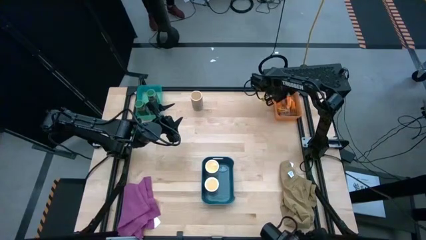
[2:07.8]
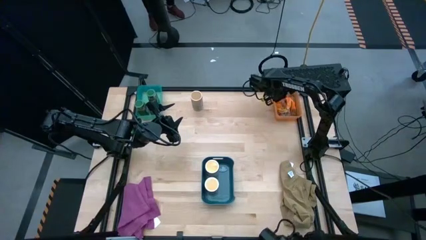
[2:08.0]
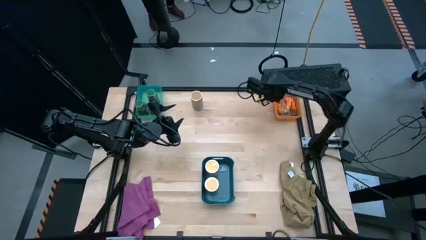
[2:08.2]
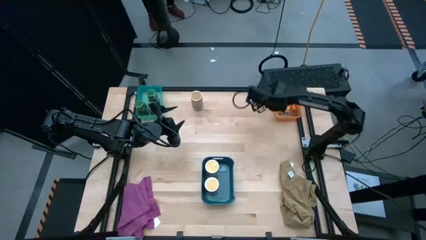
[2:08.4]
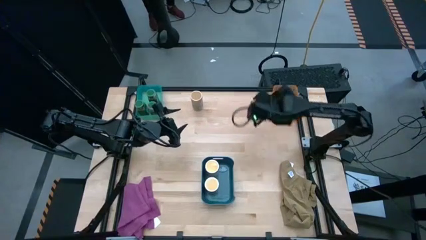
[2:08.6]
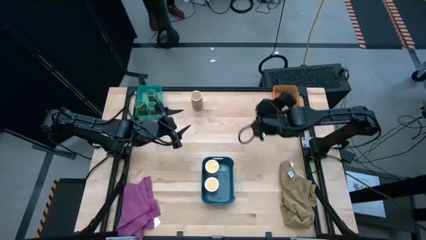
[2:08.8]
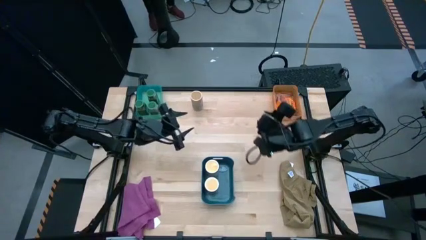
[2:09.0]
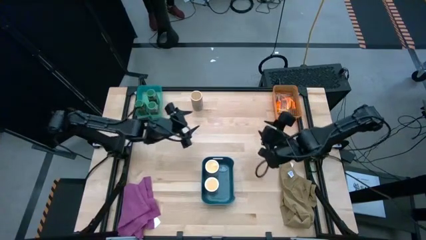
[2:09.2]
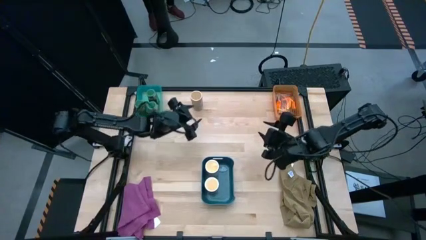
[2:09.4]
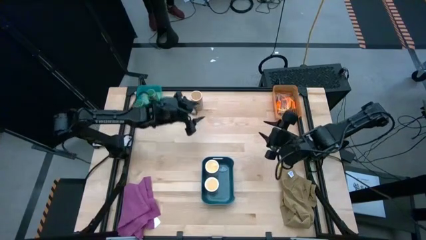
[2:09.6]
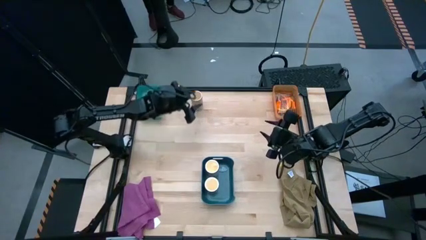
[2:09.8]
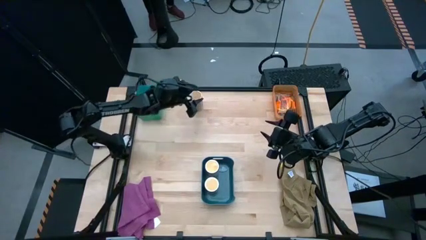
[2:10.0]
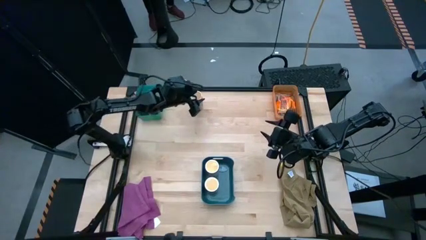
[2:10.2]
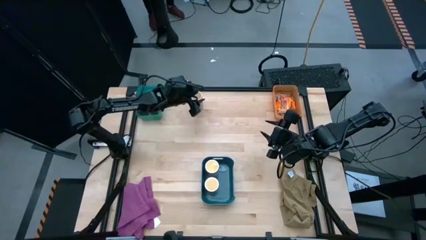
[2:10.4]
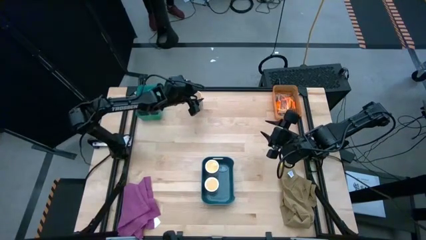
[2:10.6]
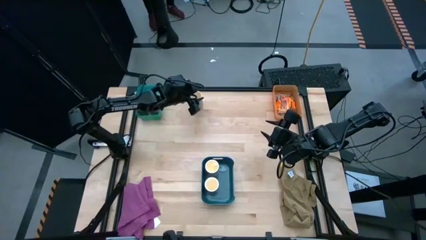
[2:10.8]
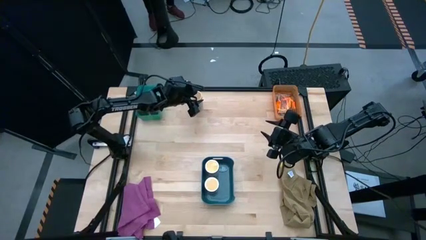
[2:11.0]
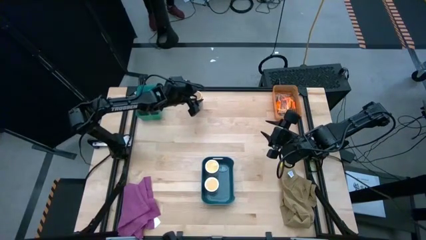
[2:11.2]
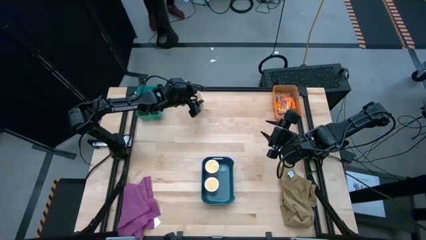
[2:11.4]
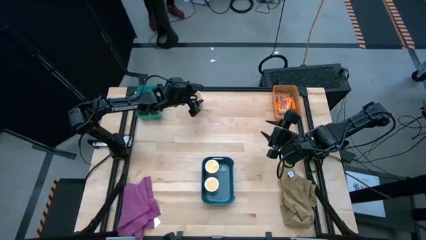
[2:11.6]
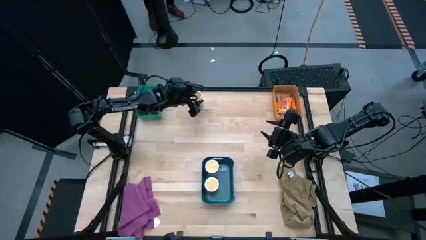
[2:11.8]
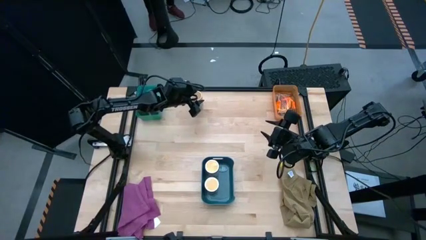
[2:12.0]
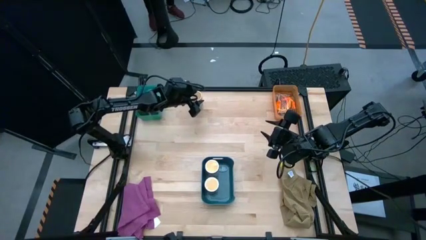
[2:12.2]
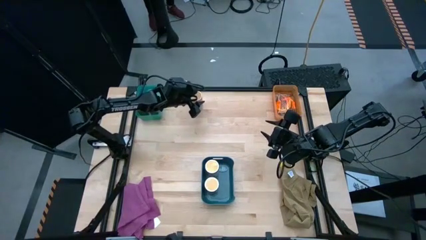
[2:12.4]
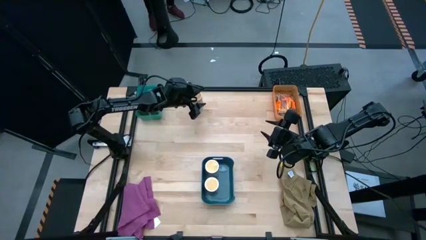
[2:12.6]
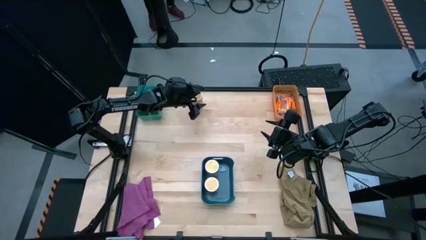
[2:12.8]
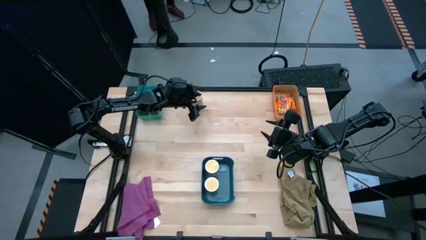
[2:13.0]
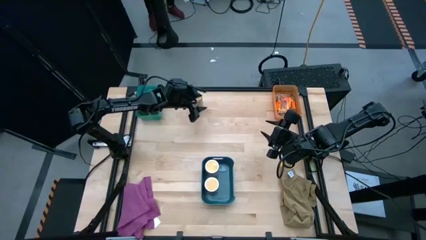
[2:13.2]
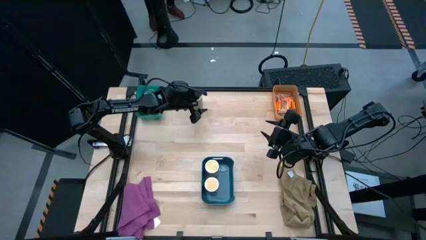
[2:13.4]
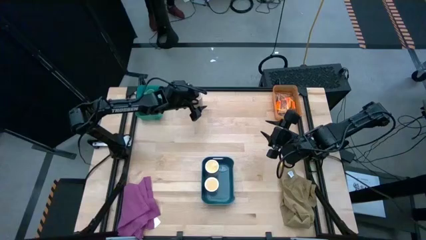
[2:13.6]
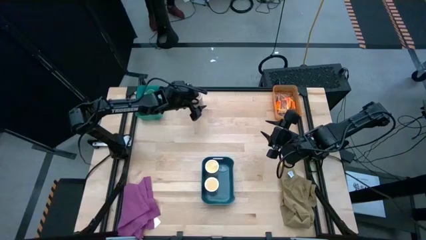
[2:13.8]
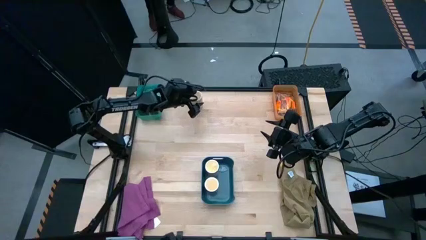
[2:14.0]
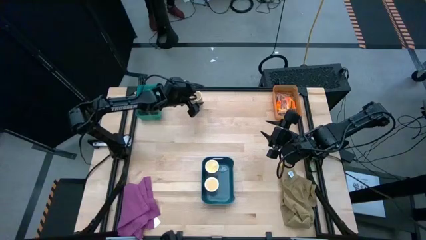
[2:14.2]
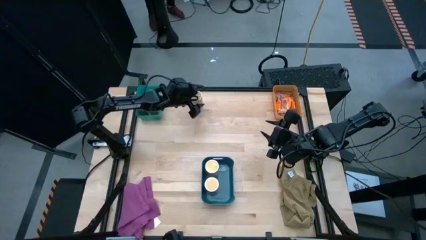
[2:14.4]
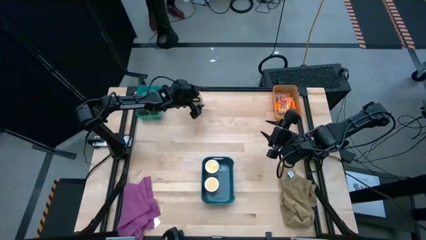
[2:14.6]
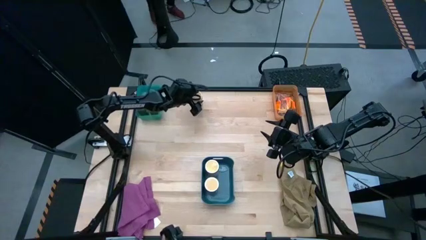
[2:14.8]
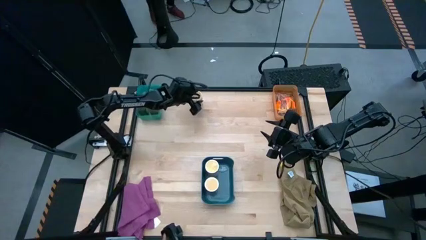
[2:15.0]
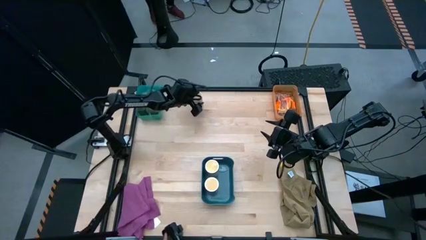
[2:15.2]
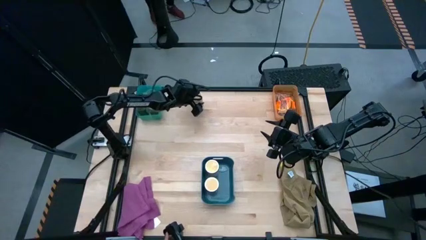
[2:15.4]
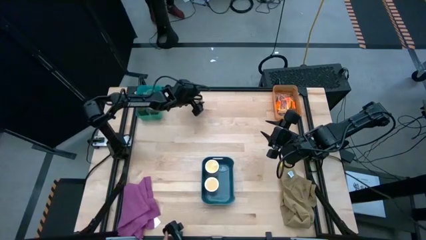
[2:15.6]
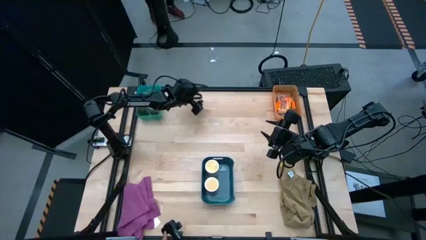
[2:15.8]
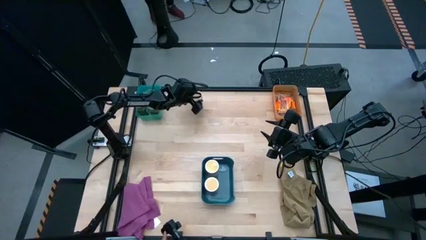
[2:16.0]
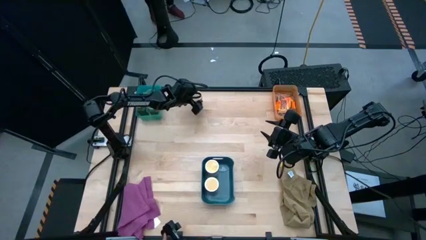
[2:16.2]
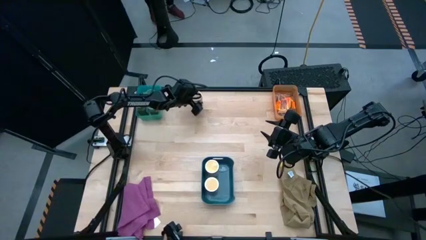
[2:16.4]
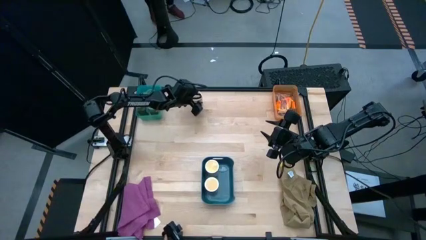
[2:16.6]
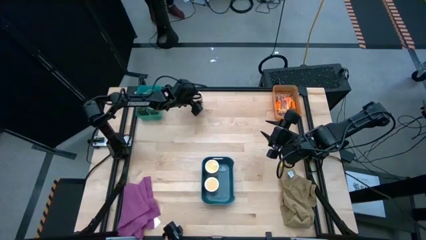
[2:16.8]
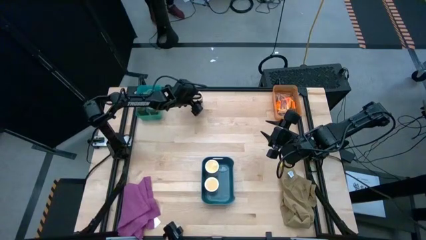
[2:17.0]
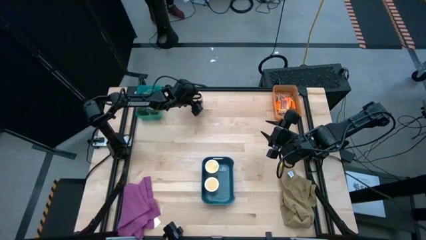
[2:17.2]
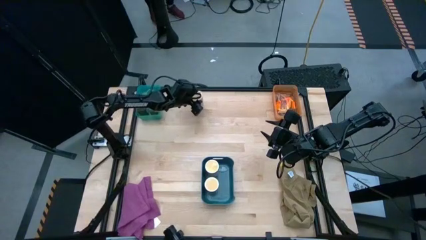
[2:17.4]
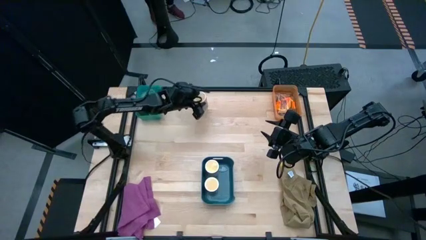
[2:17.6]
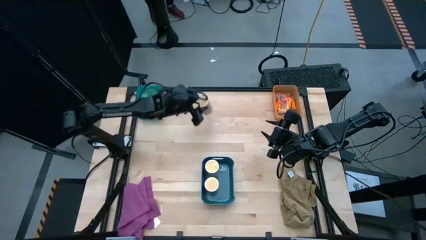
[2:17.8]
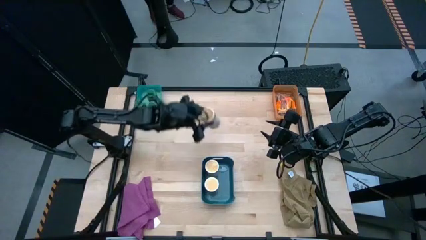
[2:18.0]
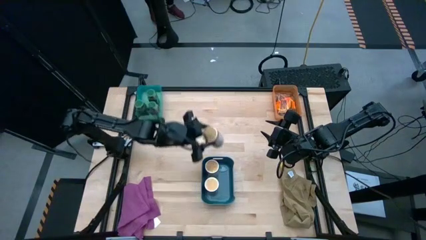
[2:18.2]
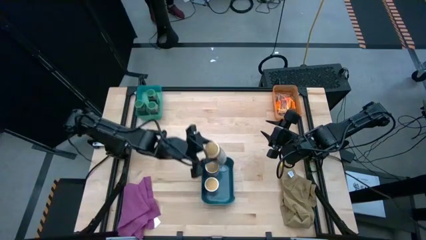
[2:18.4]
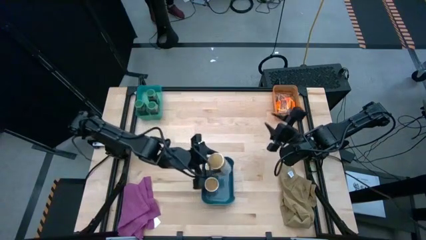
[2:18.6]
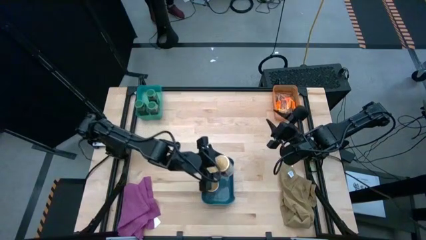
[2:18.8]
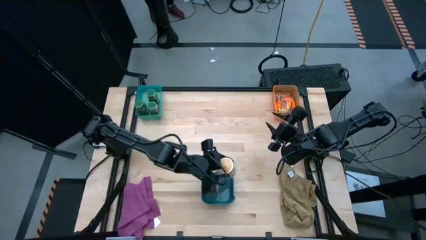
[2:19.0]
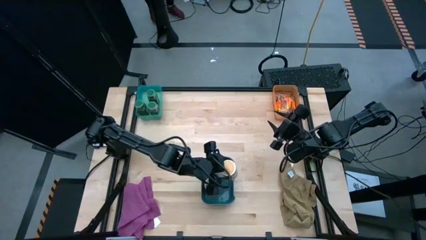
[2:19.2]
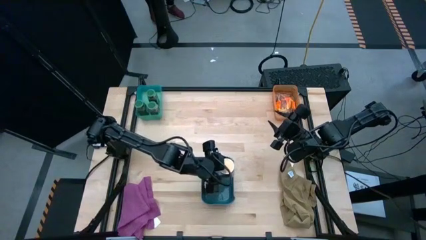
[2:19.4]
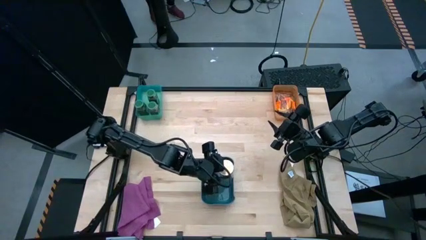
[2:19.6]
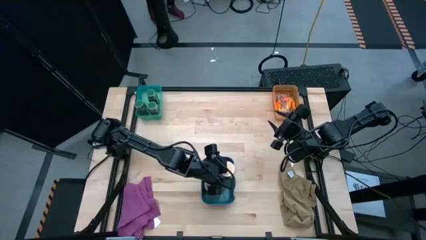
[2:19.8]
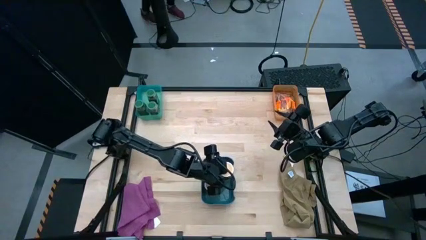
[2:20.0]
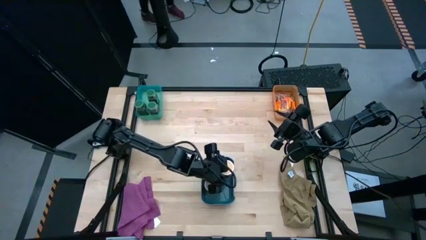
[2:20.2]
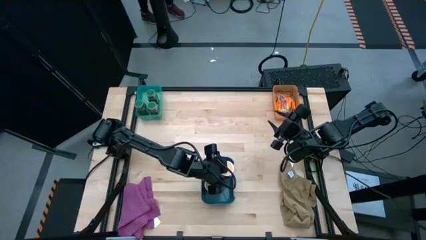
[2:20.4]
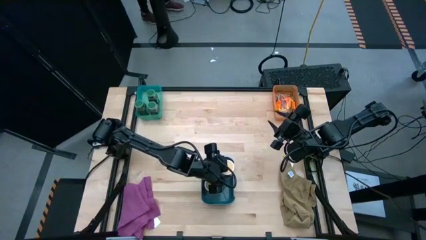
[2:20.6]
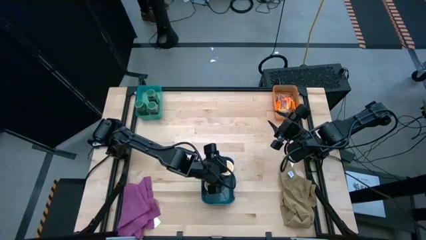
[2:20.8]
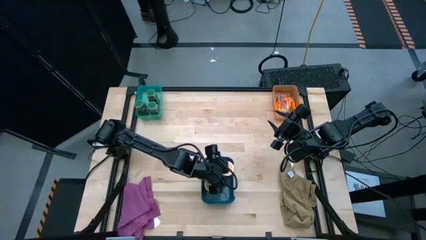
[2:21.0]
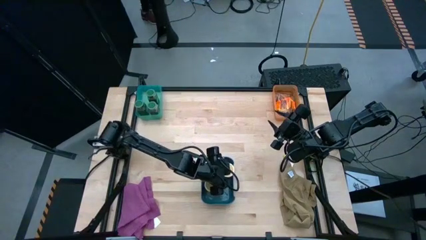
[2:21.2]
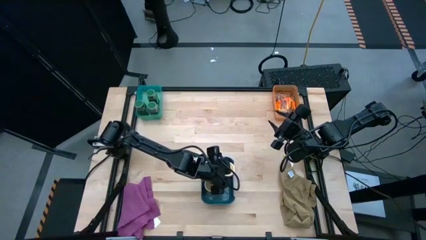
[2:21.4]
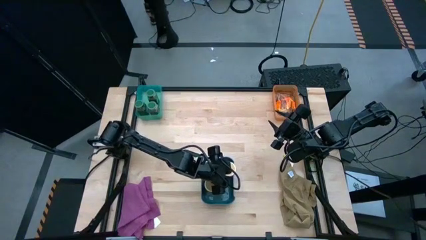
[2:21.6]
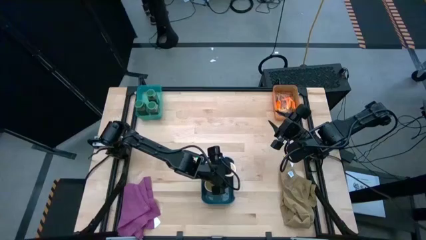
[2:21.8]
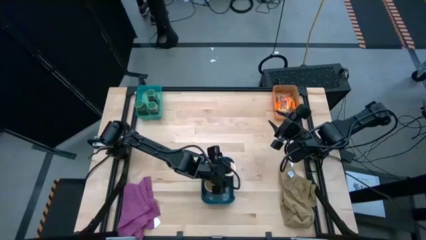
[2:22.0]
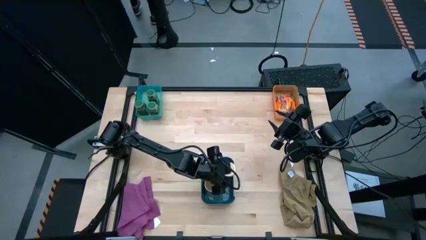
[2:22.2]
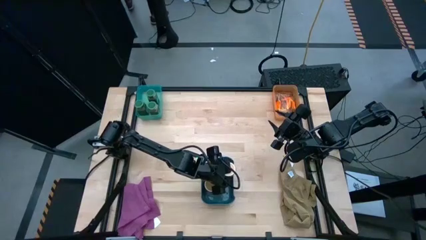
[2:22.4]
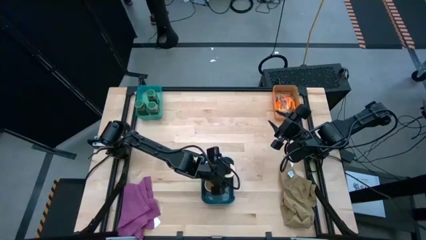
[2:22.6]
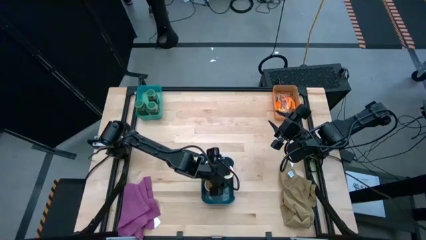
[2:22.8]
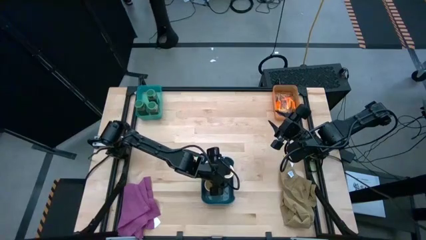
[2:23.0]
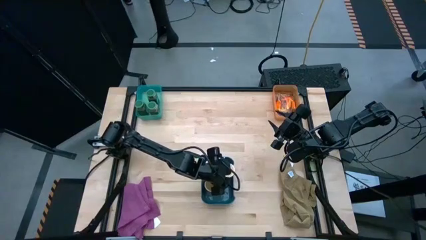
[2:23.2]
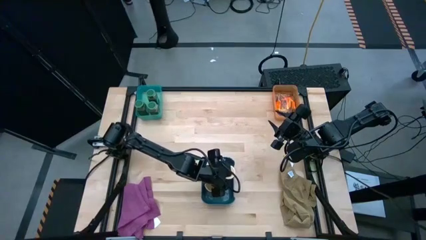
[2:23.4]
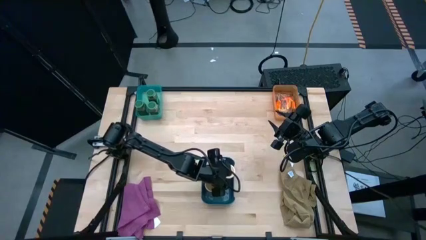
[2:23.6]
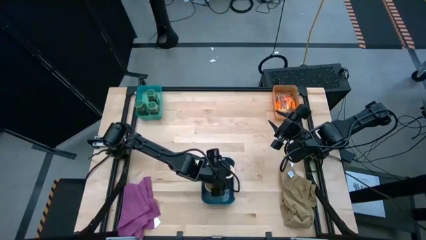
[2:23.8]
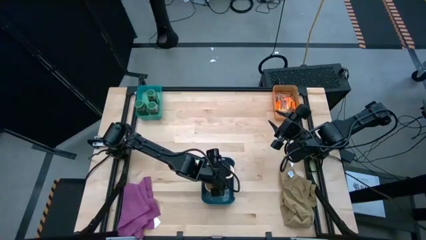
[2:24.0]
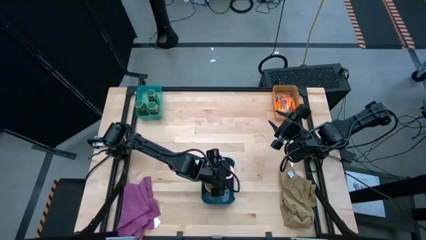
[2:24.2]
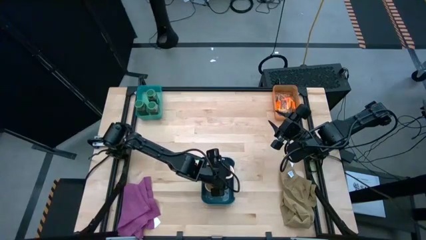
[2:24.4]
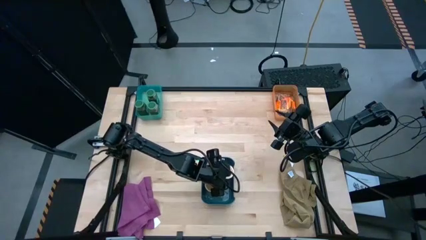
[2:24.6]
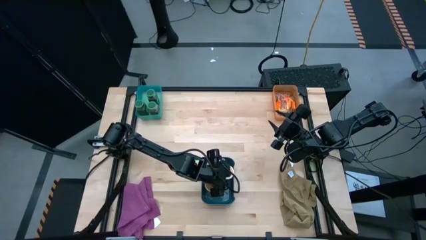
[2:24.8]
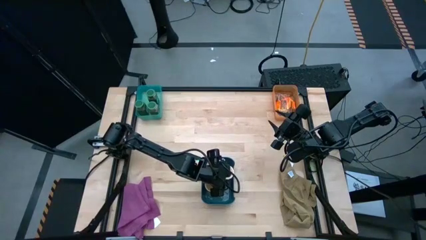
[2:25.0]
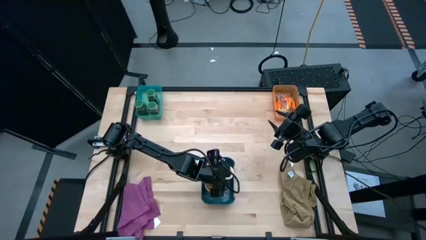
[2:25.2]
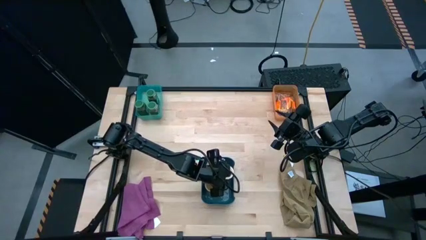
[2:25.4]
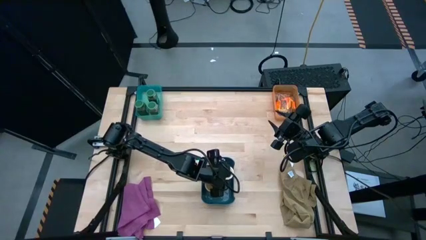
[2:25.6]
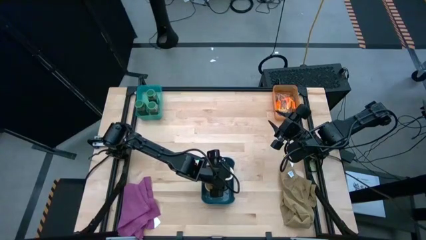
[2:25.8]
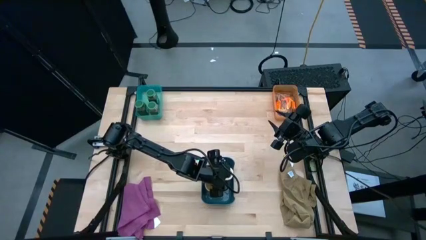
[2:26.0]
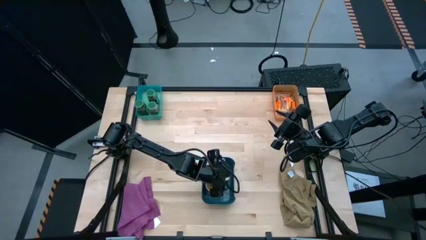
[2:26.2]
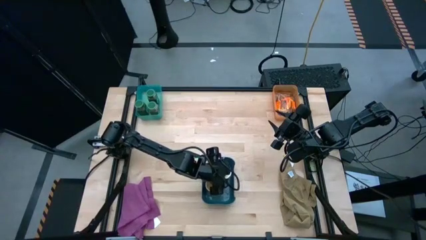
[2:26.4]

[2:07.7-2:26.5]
Task: Sort spices by type
Put the gold seasoning bottle into the blue bin
